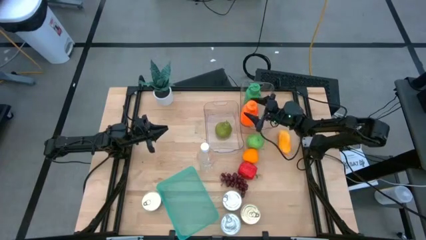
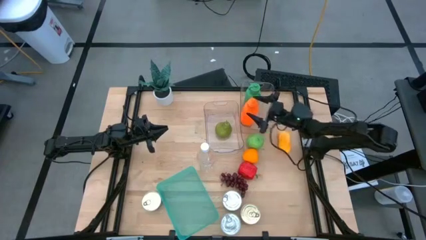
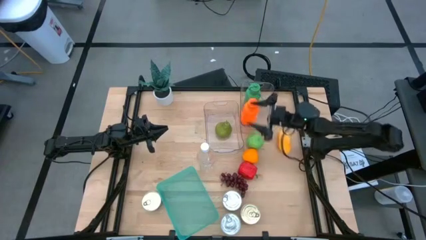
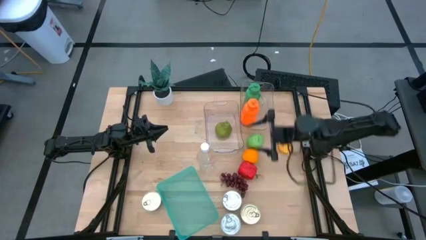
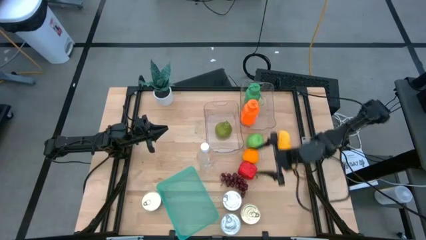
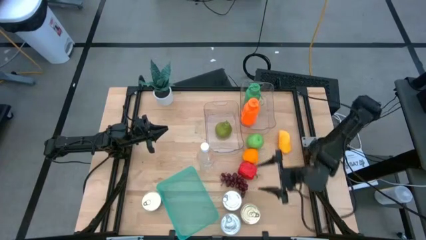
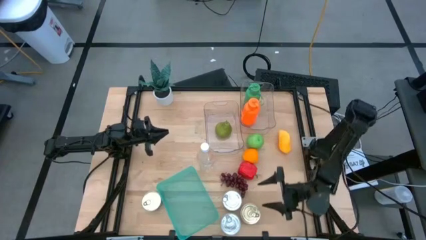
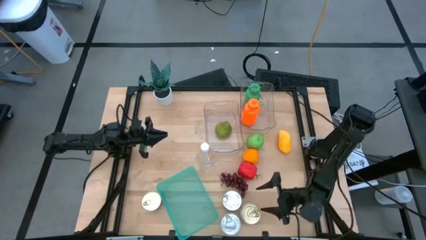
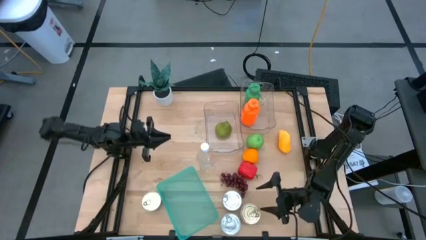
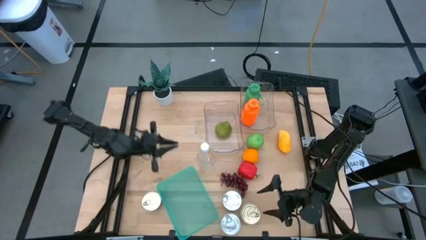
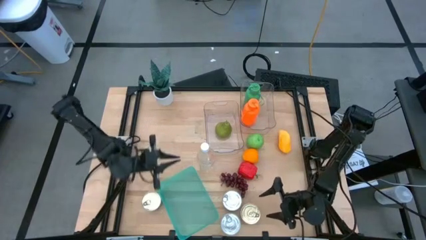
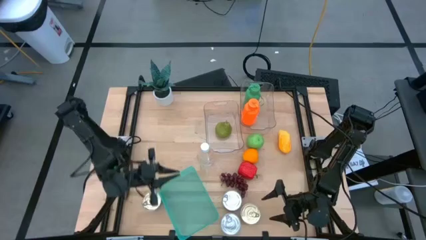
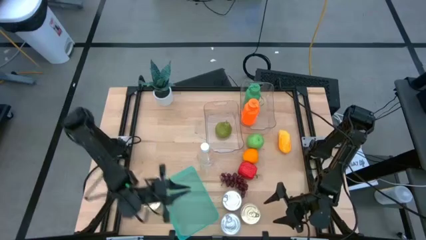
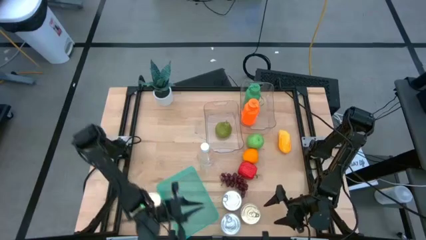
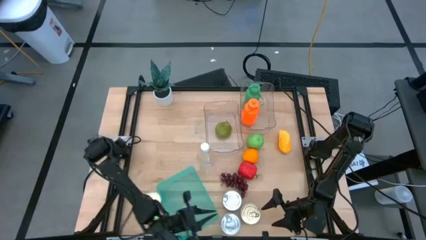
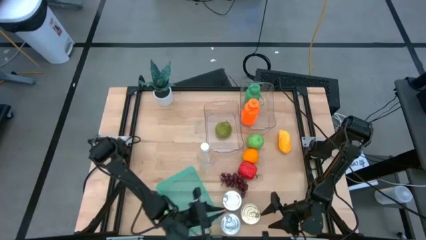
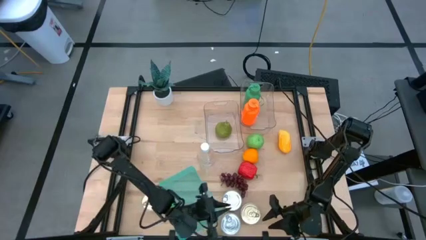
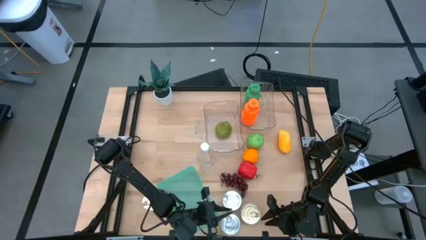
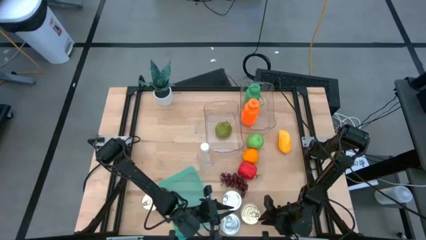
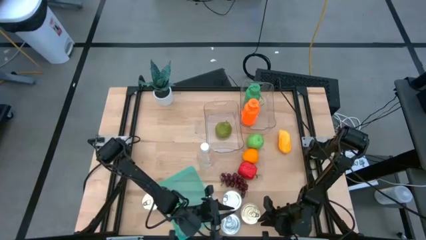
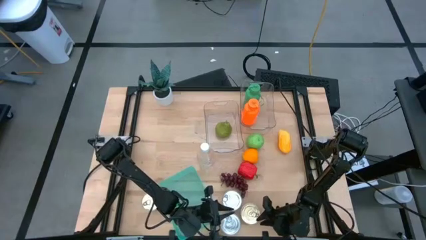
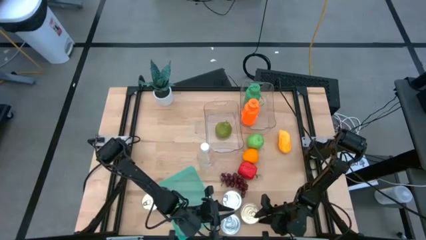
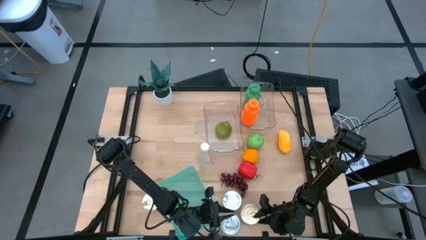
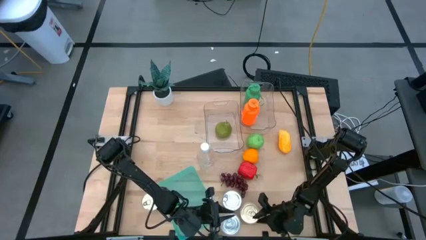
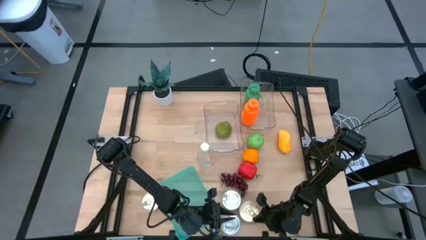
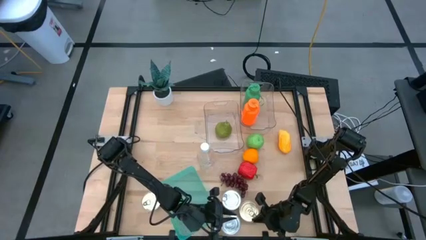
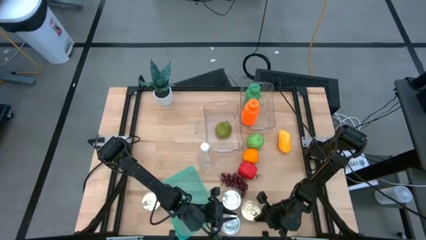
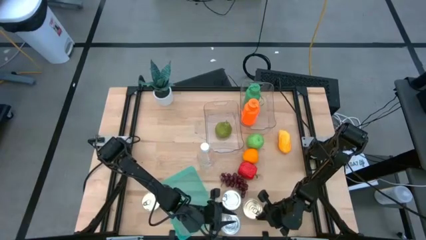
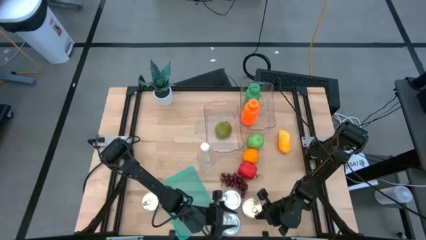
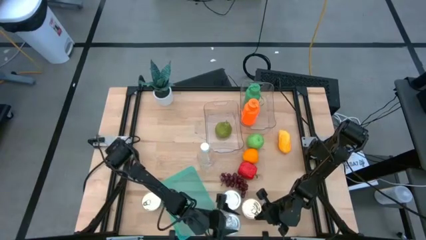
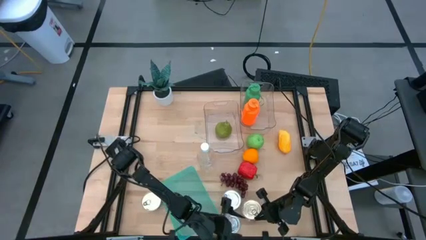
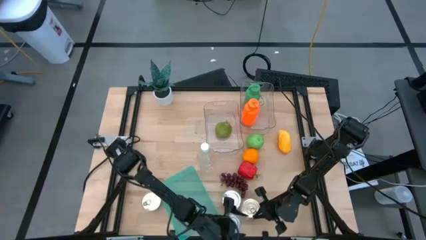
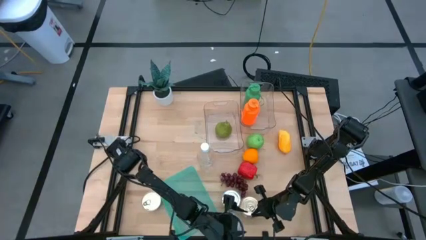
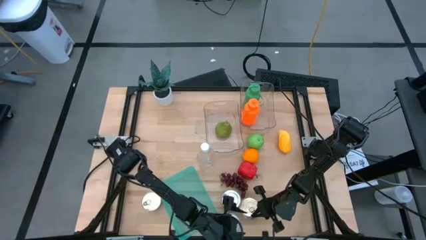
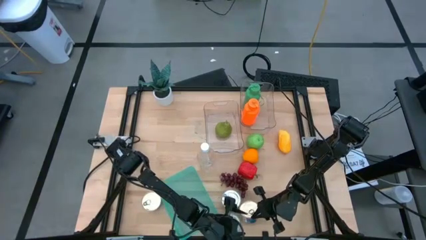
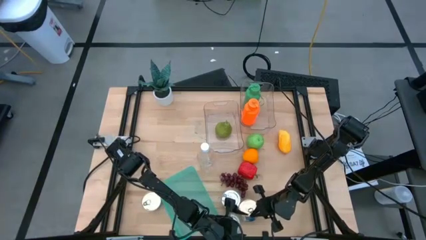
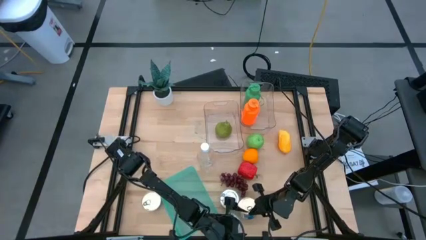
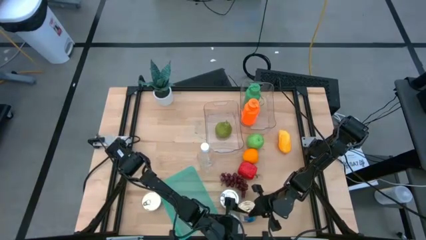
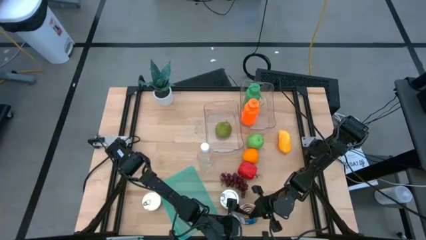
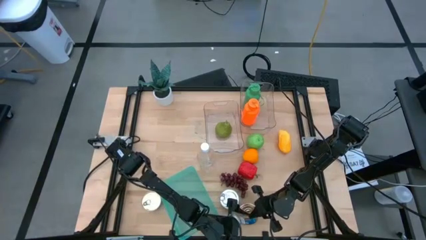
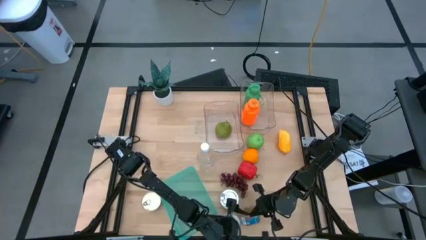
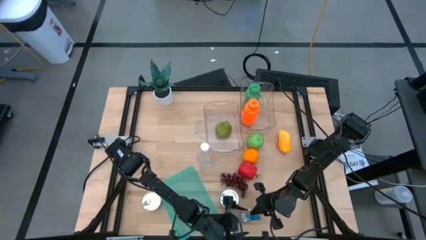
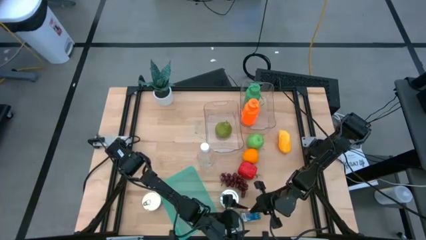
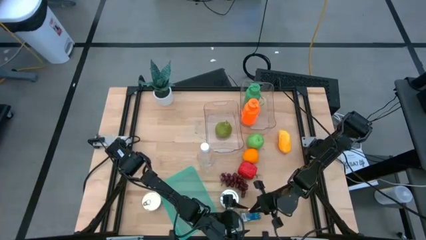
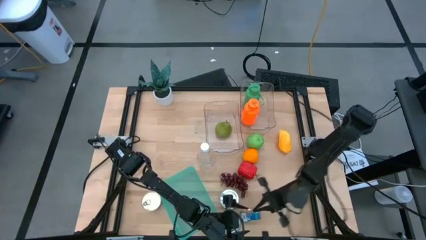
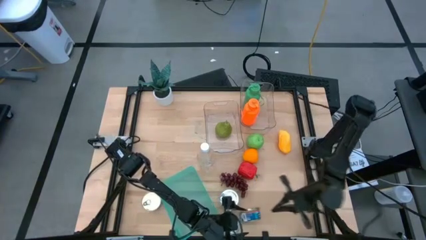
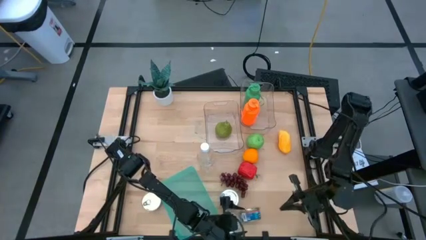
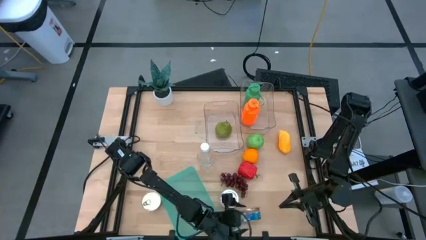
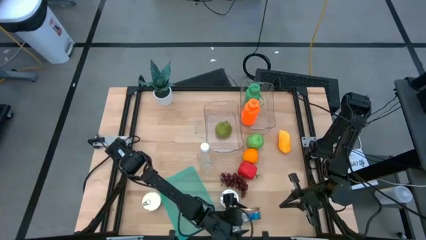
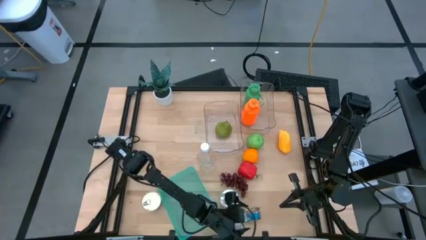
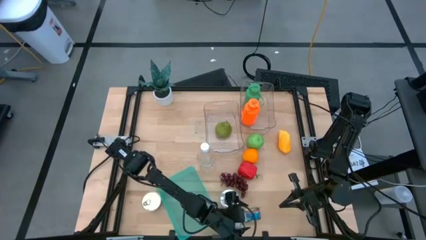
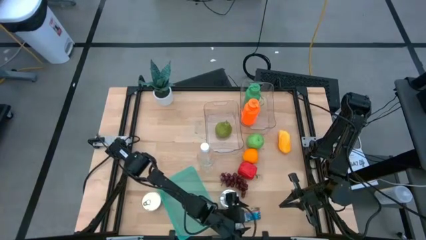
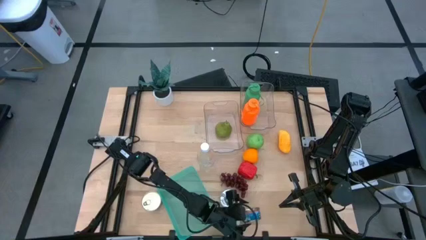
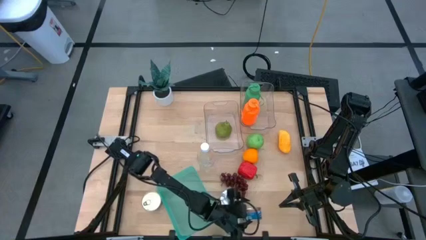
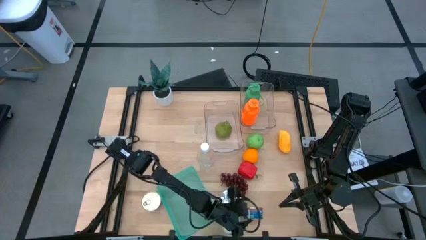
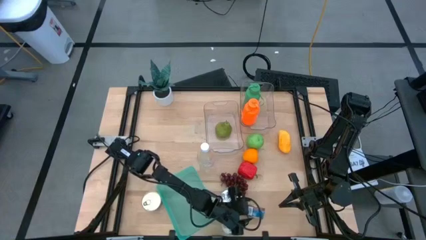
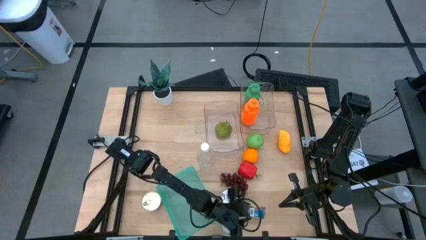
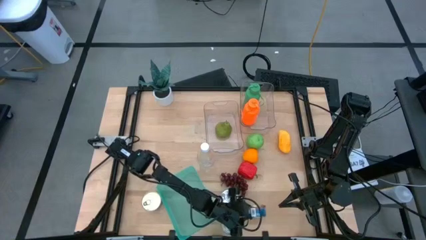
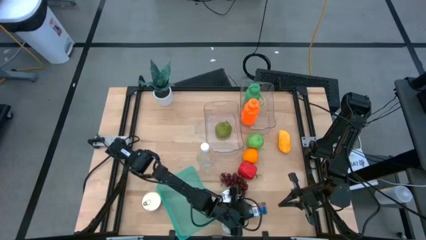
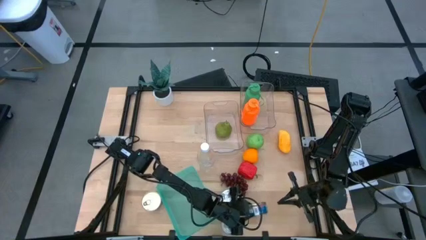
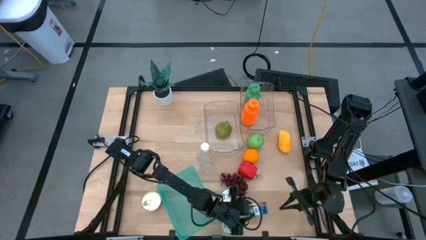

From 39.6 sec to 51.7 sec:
Task: Pick & Place Food Item
Put the right blue tuna can into the green bin
